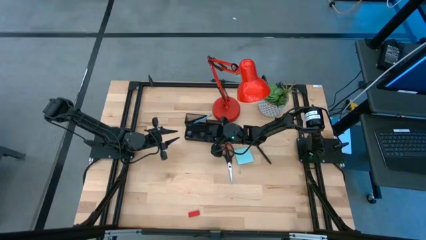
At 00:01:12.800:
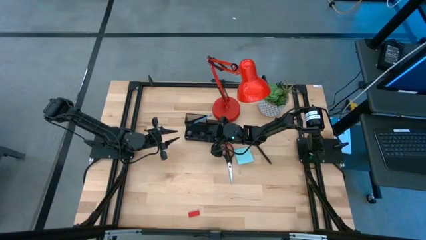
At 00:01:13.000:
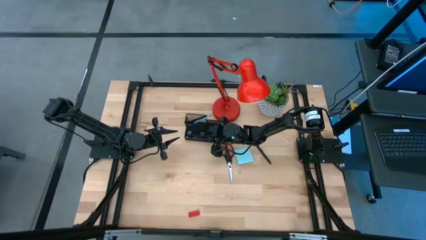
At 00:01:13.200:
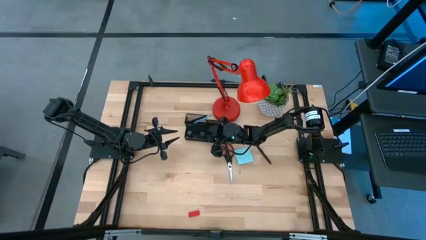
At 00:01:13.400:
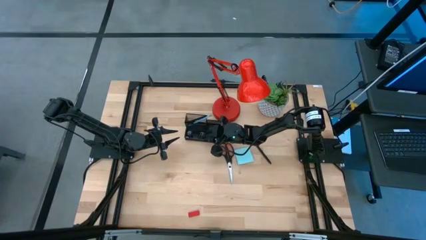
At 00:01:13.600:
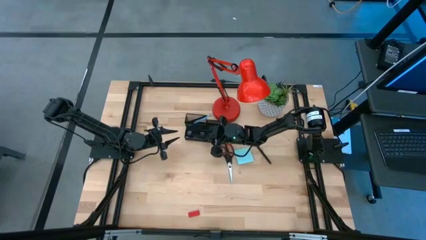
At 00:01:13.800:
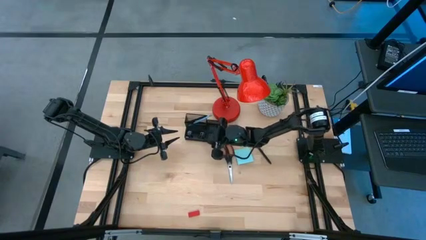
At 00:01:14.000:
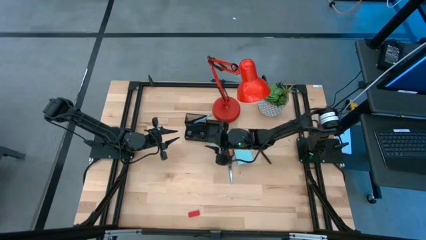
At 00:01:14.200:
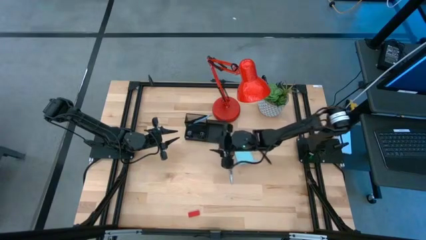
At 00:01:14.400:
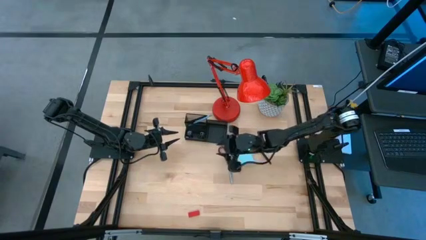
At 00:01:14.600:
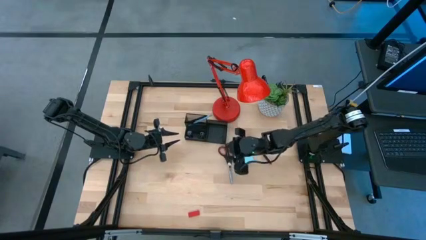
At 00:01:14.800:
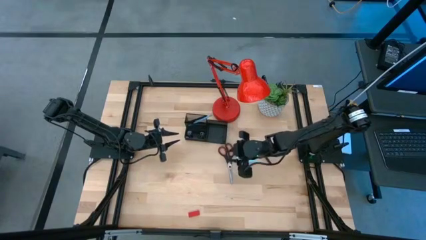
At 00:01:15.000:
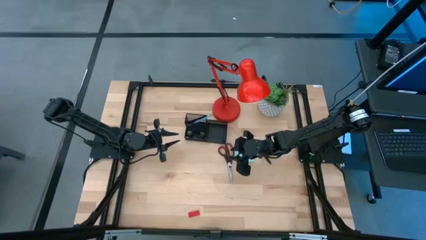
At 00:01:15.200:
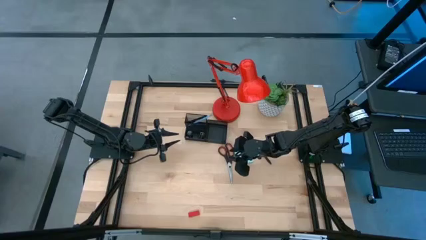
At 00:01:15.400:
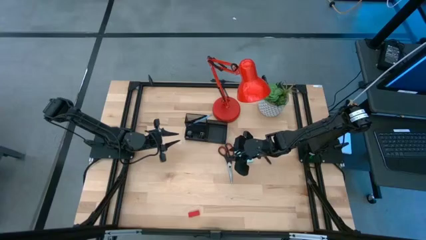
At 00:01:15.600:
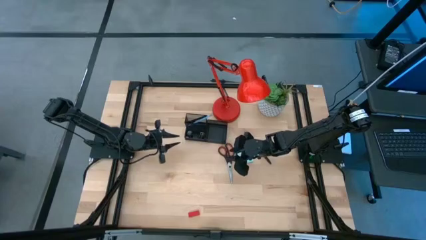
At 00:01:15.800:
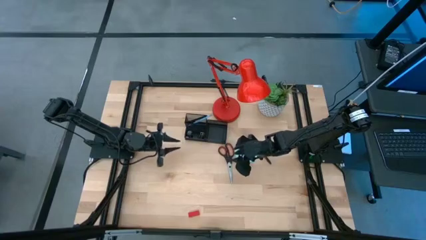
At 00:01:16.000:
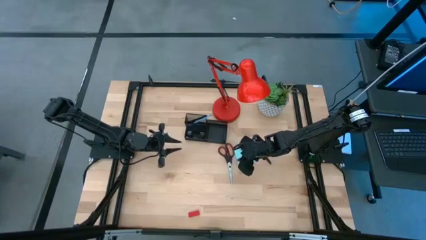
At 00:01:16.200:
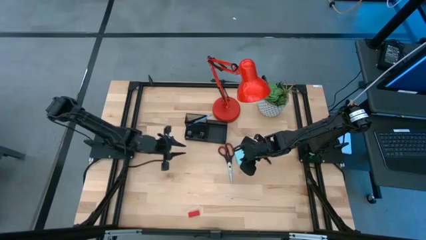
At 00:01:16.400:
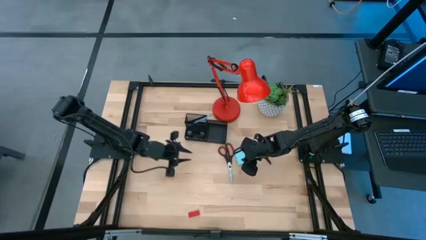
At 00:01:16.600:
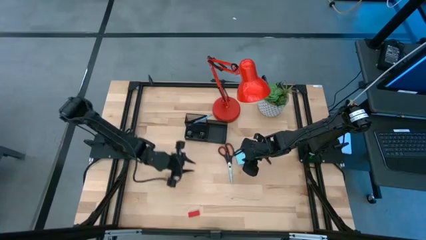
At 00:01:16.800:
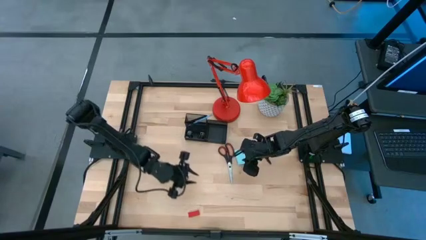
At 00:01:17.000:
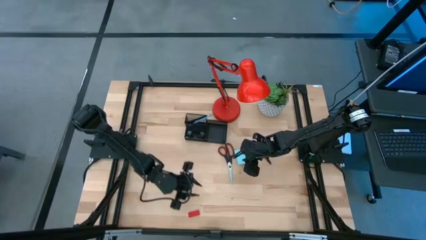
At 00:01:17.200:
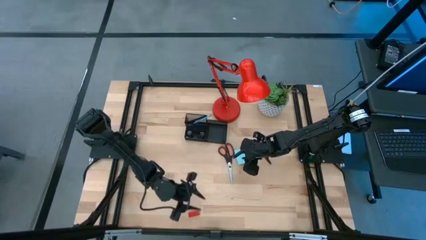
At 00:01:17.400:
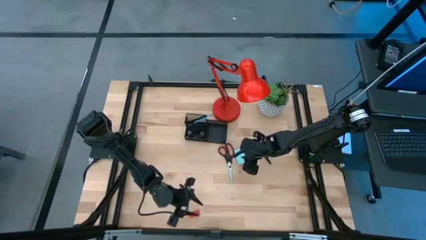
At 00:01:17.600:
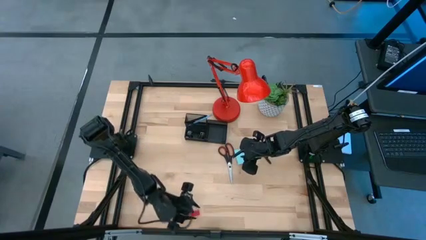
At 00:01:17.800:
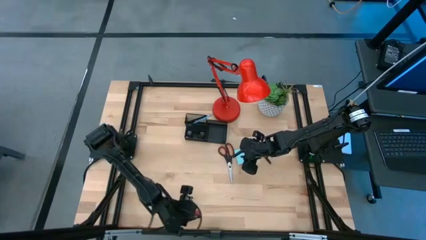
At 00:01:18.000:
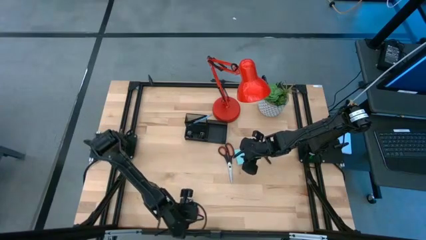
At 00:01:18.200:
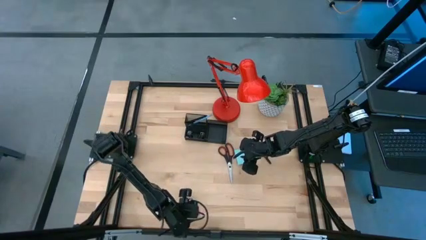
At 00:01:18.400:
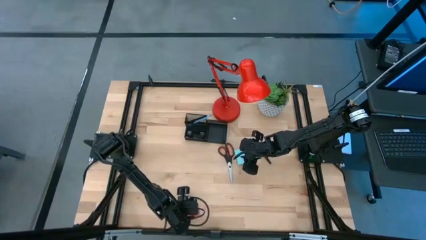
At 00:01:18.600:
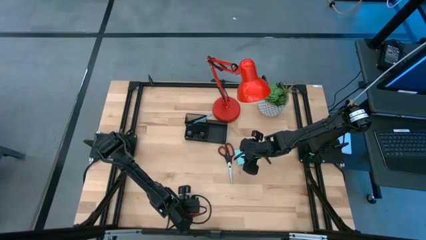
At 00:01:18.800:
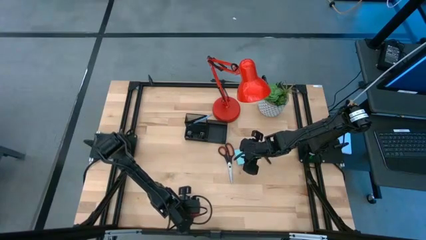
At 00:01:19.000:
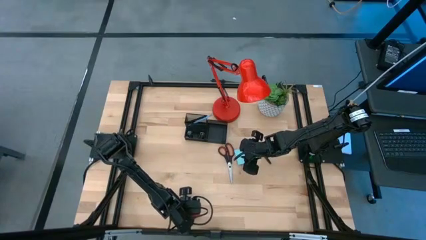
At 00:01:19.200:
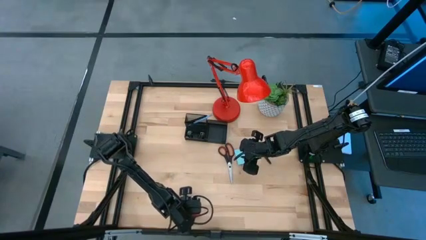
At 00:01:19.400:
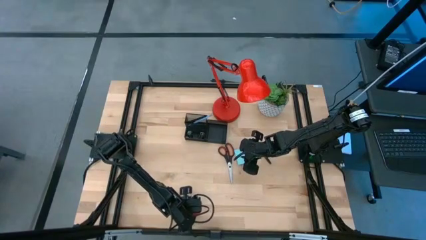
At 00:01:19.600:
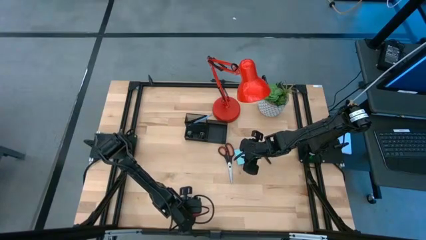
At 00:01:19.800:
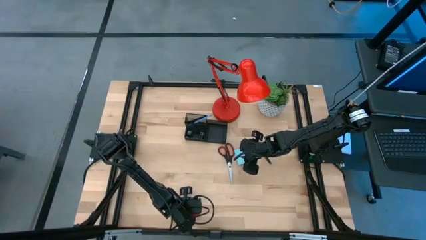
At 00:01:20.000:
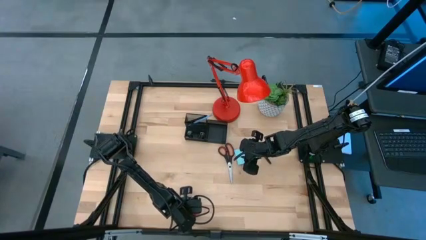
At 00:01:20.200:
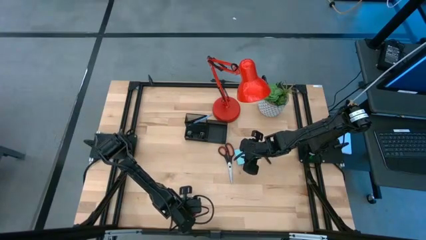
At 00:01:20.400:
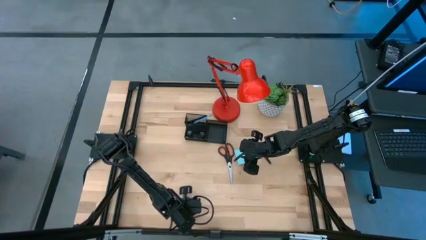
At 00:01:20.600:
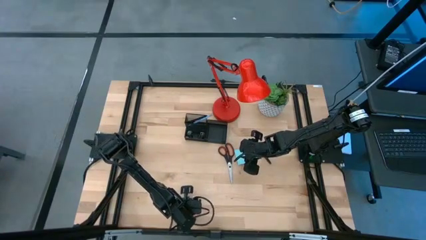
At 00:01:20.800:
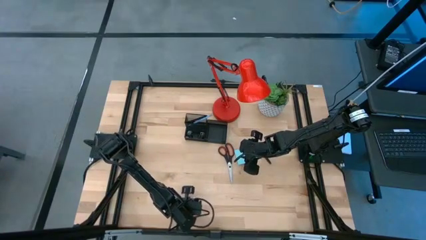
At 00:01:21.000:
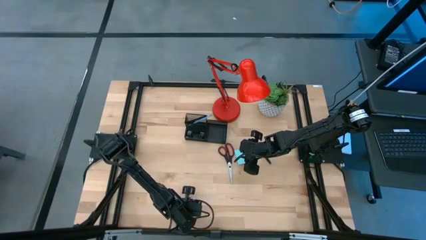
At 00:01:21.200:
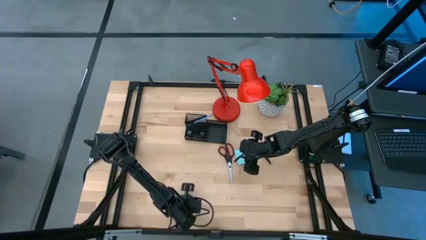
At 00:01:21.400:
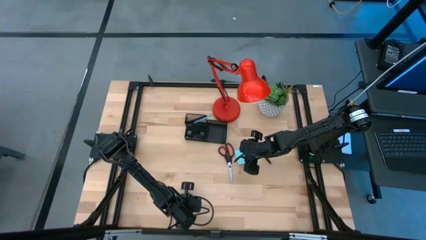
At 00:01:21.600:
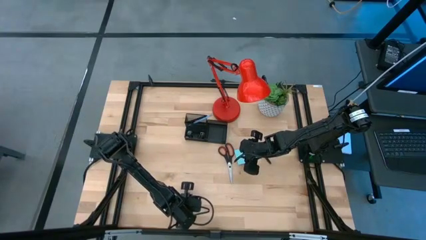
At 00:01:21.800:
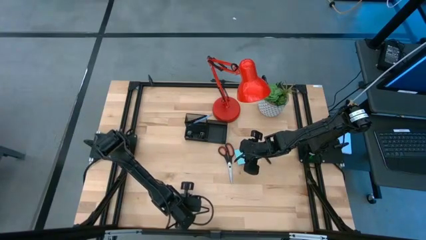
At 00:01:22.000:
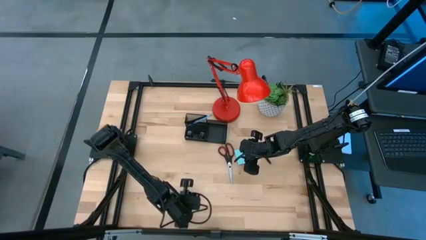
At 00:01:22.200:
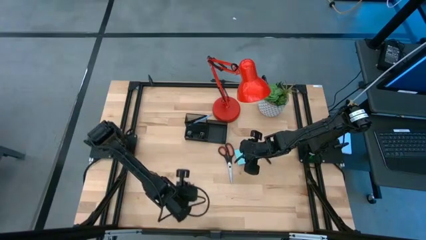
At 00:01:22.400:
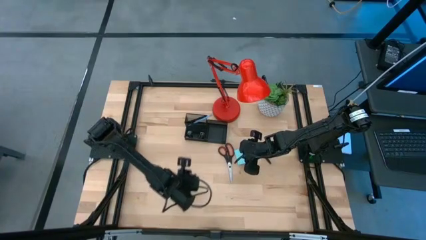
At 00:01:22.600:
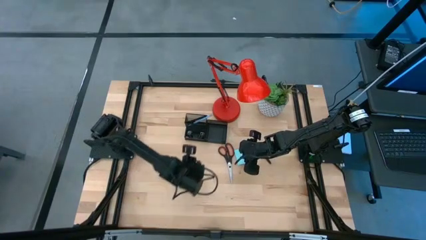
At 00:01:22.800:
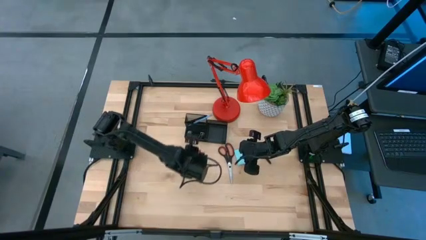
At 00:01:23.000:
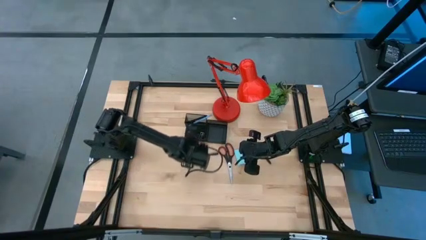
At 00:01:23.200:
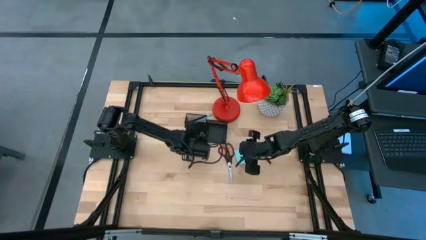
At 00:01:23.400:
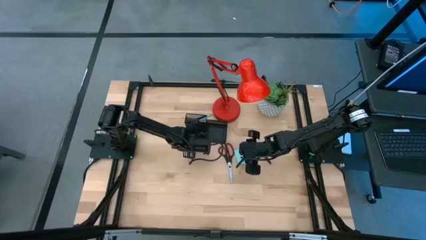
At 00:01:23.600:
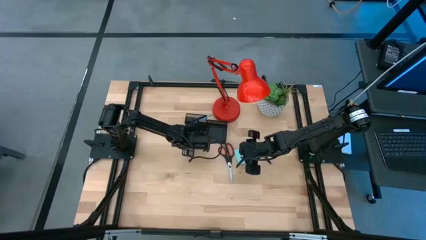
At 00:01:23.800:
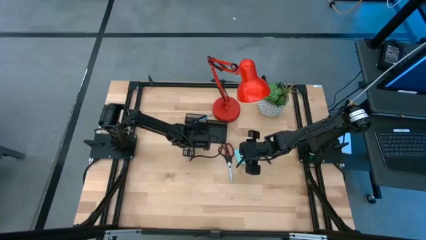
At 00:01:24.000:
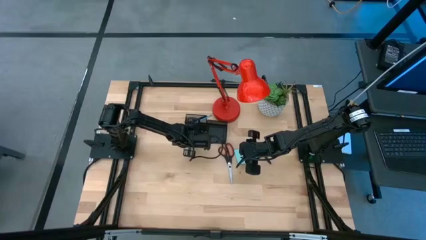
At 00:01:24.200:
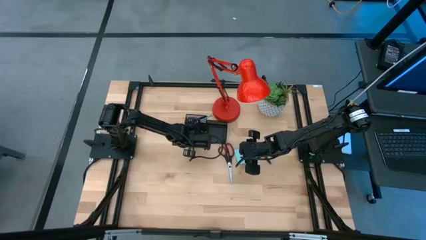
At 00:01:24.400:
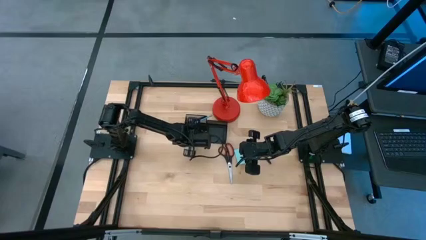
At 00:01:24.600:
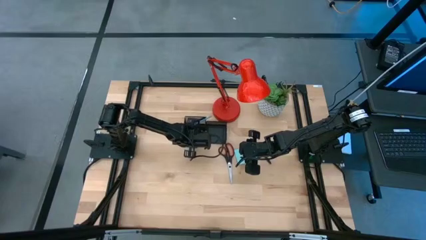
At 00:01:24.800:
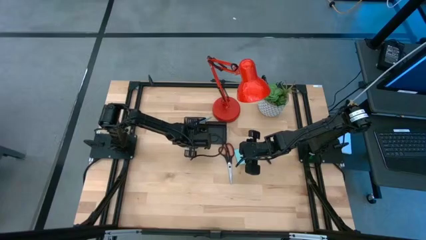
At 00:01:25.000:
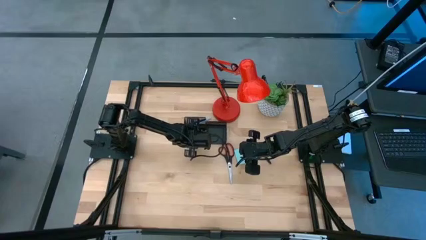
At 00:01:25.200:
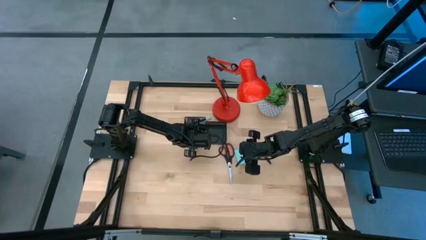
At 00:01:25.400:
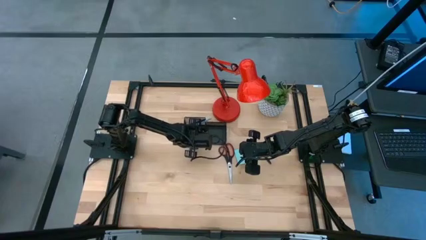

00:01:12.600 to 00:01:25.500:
Task: Pick and place office supplies into organizer
Put the red eraser into the black desk organizer

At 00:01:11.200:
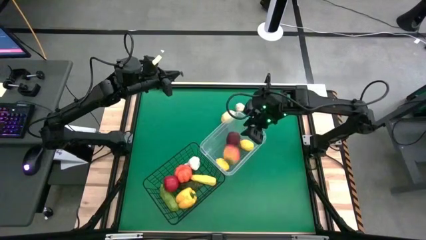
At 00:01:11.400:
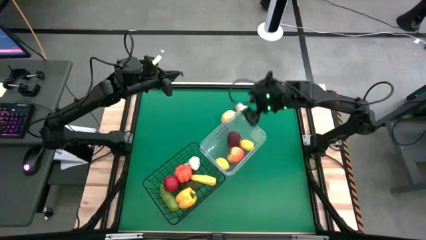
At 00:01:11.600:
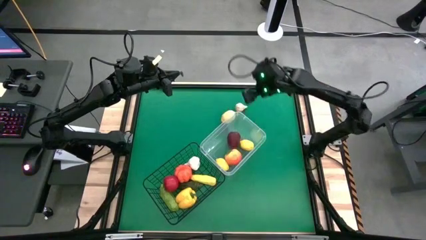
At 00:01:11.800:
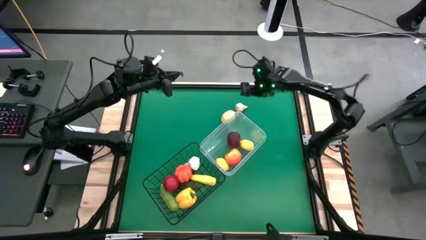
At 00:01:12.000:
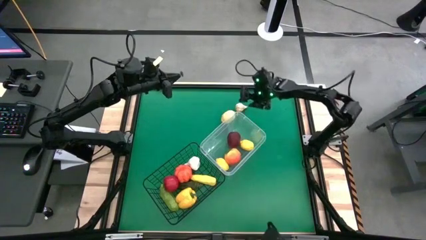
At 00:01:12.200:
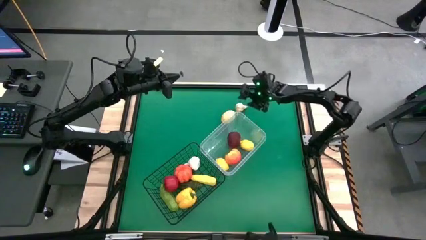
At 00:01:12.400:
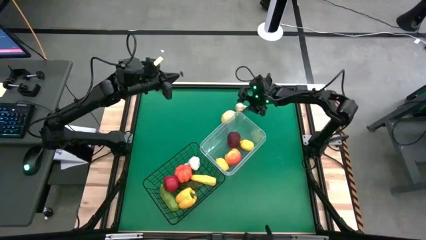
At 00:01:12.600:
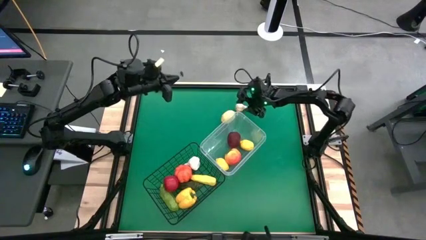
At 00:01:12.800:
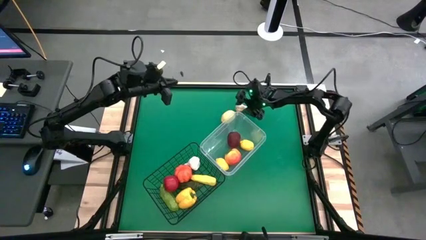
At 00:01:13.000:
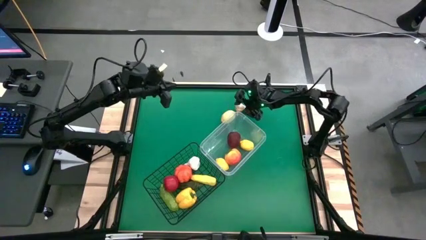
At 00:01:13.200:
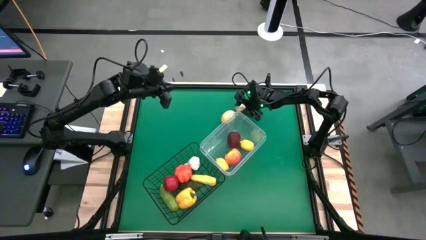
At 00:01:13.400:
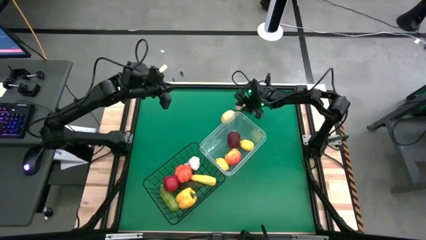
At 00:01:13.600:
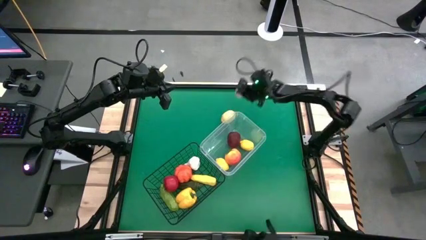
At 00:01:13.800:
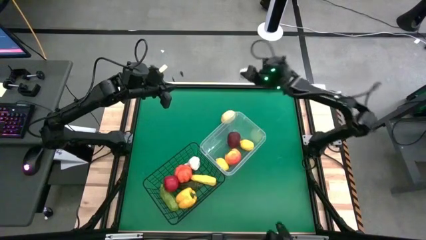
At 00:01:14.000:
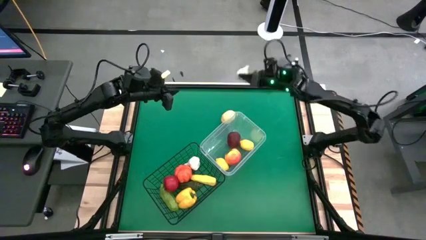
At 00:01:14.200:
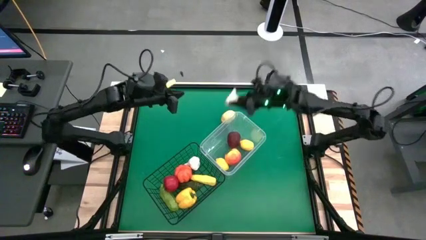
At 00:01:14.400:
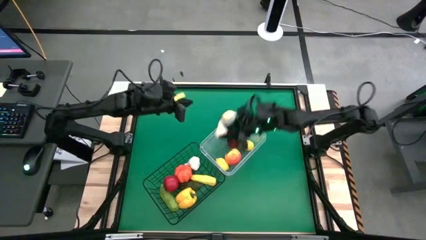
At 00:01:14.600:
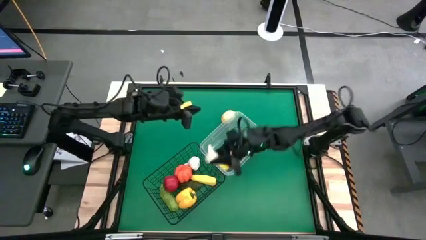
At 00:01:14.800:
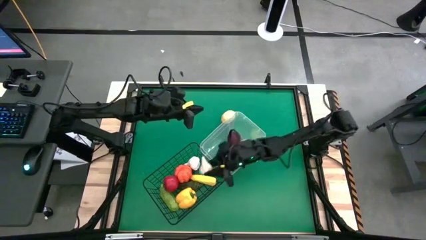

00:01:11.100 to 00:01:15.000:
Task: Sort produce into baskets
Put the white garlic into the wire basket
